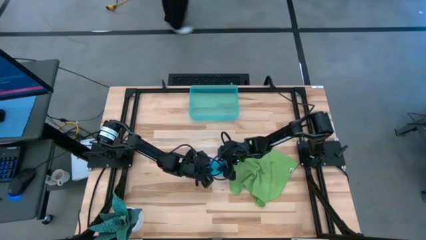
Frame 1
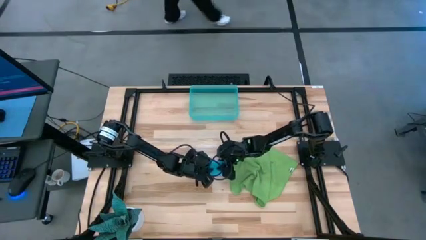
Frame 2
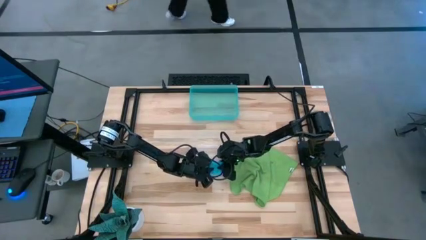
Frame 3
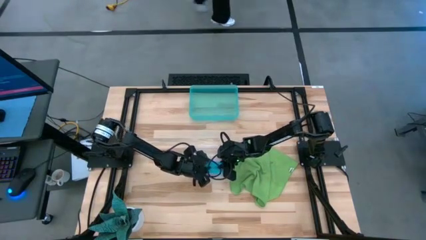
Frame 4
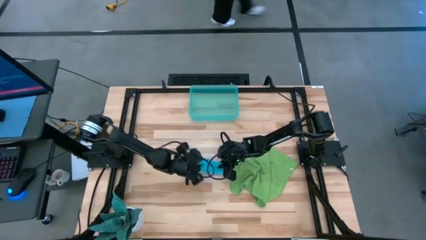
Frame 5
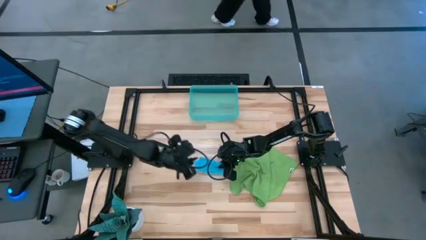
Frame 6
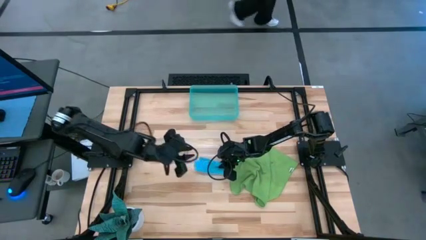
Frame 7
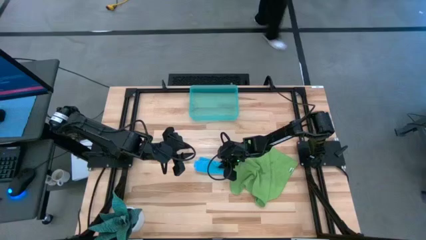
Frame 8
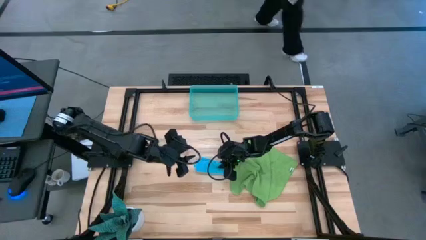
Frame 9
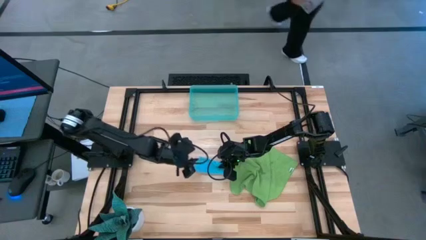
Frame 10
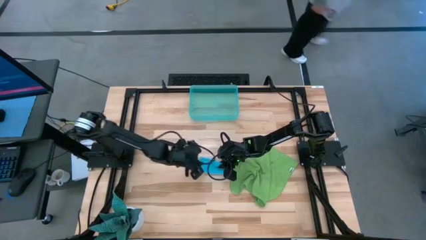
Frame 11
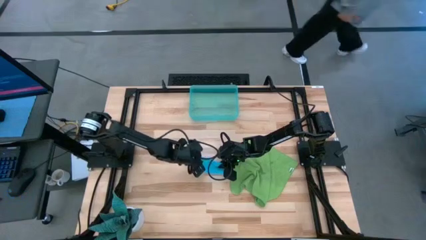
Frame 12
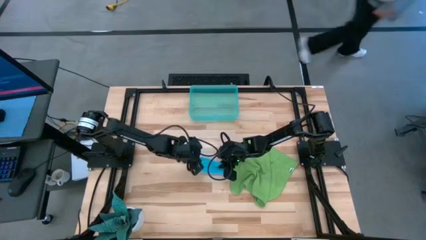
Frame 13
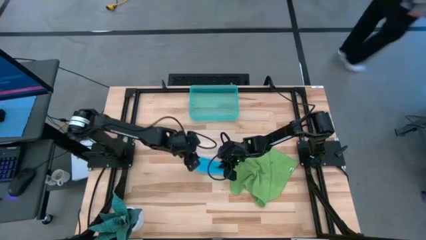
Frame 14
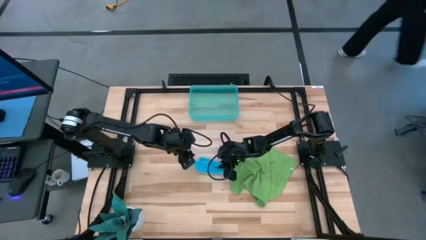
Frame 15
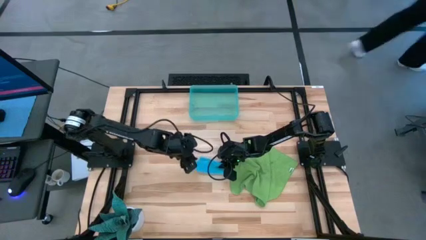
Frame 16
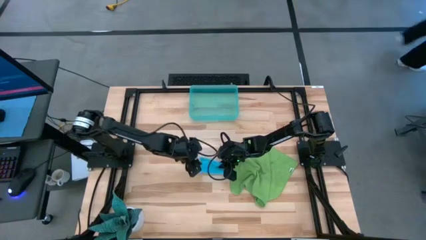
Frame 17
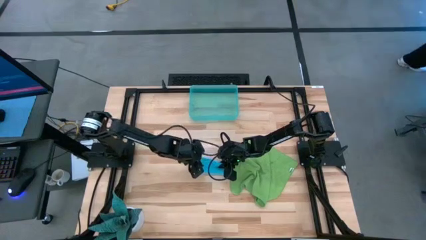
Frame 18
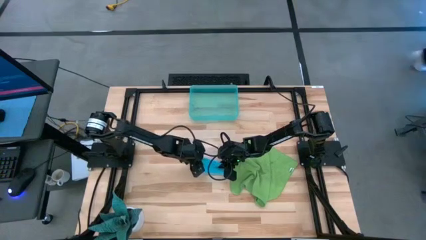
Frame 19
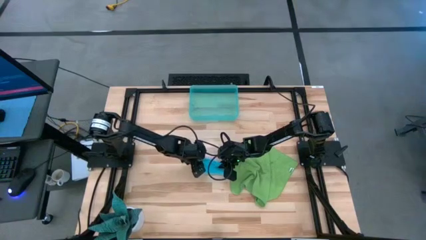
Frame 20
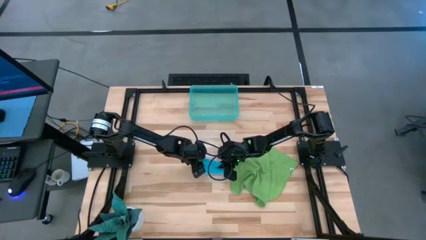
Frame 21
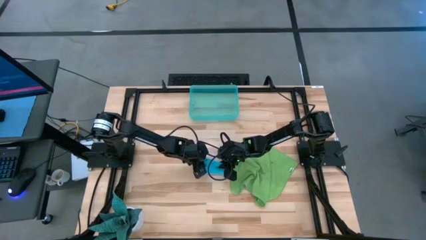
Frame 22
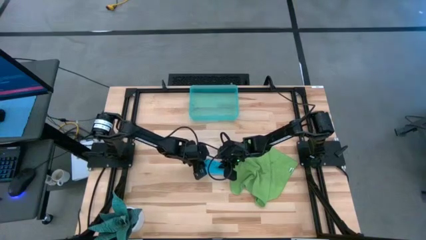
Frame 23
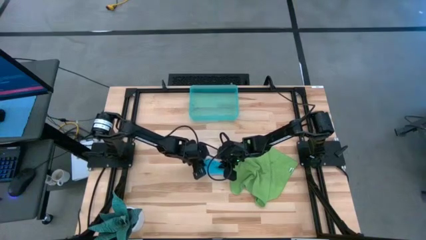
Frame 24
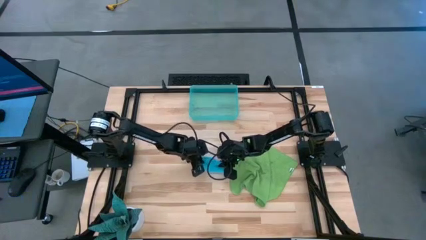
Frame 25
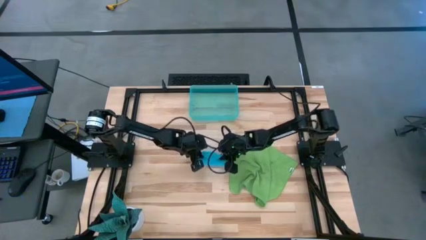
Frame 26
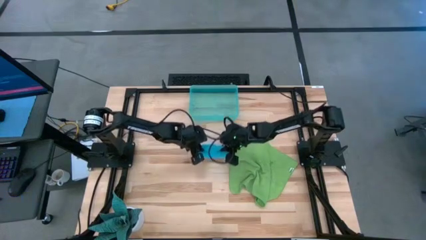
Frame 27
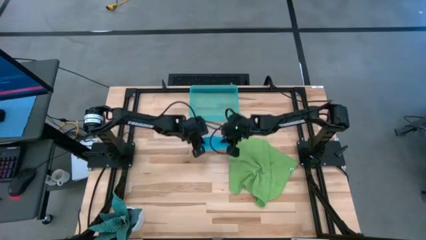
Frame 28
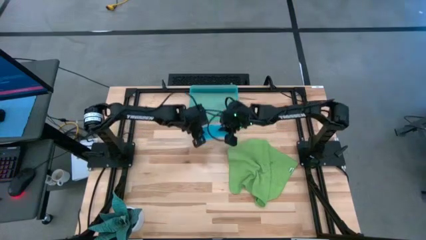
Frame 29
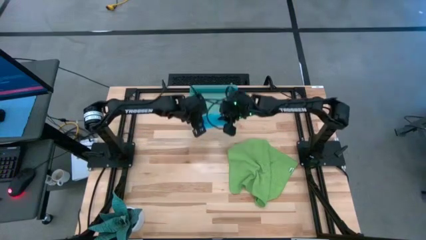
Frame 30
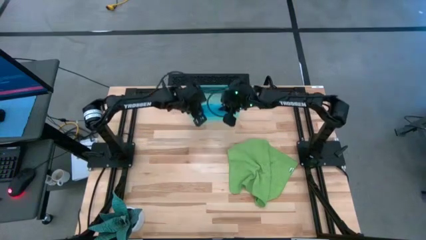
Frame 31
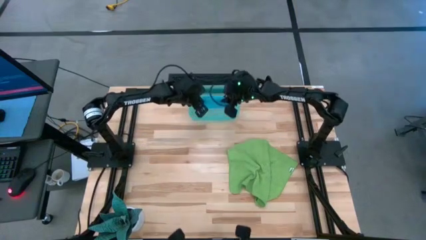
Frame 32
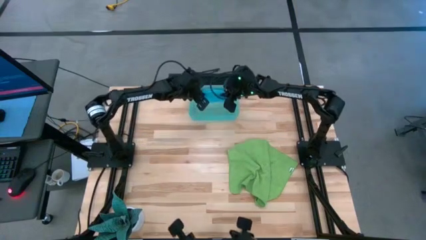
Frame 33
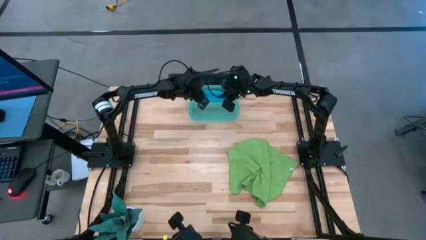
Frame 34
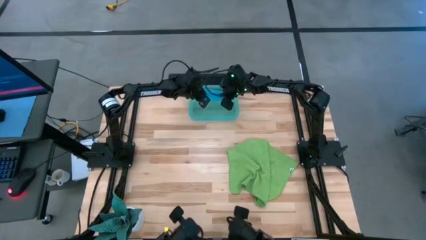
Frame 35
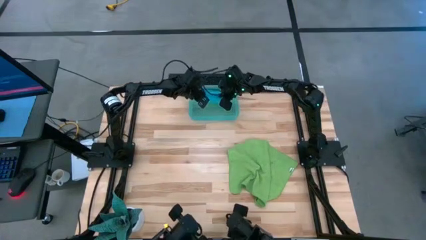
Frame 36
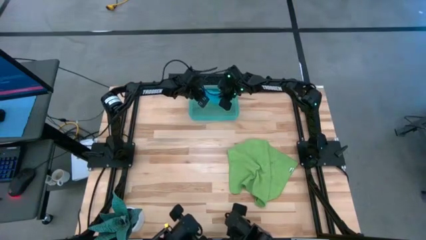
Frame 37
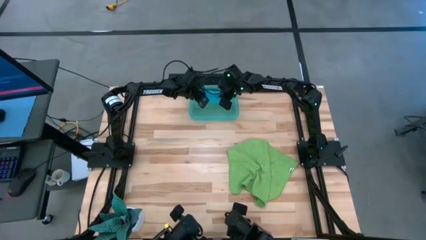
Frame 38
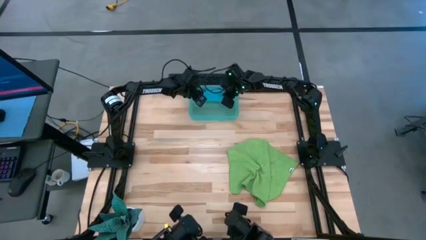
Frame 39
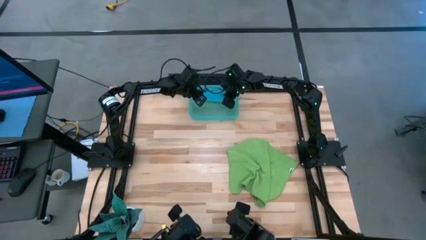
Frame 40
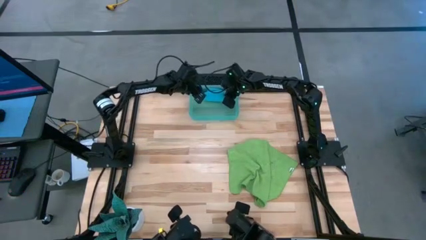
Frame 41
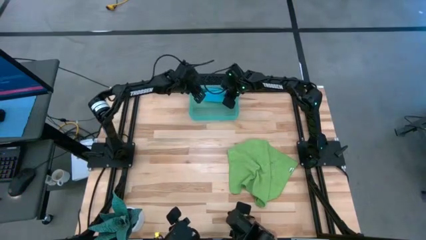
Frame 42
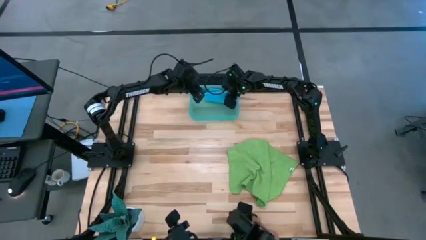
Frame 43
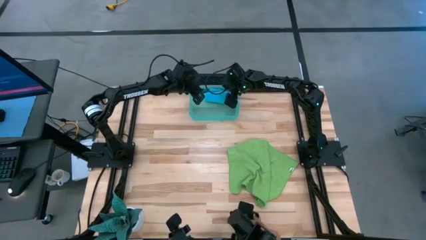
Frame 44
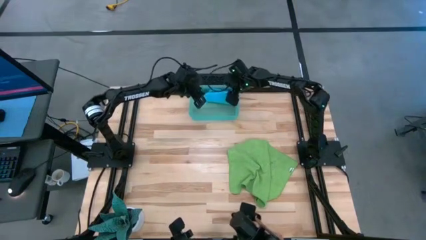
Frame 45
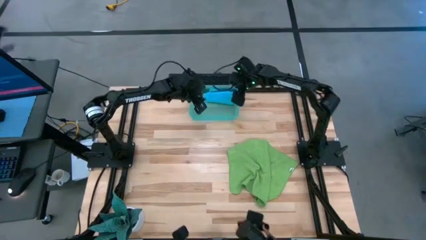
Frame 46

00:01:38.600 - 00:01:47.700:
Task: Roll microfiber towels into tight, uniform cylinder then place into a basket
Put the rolled blue microfiber cloth into the blue bin

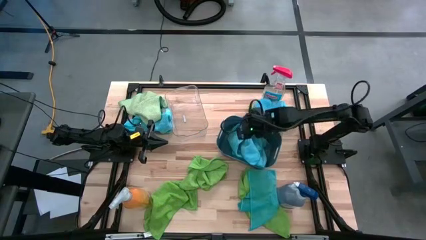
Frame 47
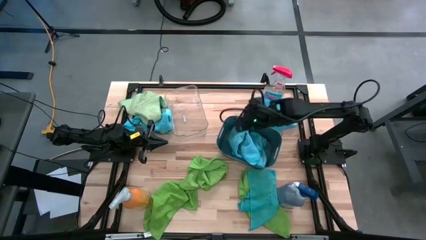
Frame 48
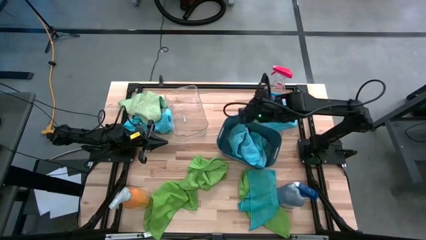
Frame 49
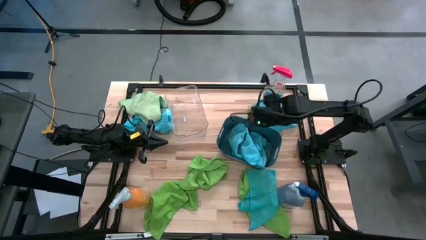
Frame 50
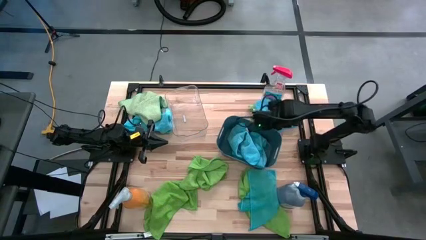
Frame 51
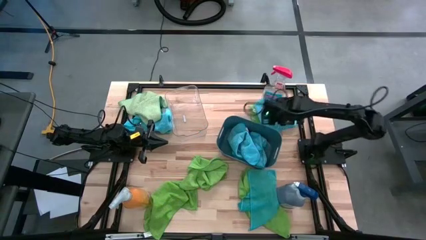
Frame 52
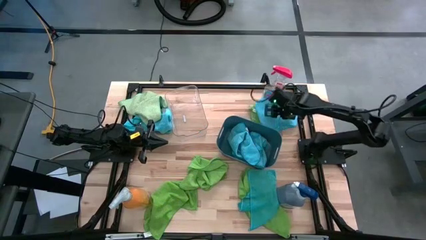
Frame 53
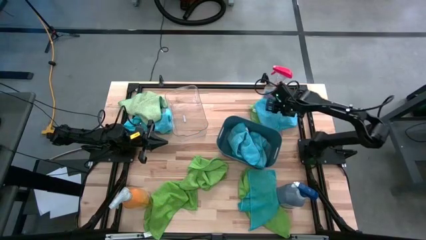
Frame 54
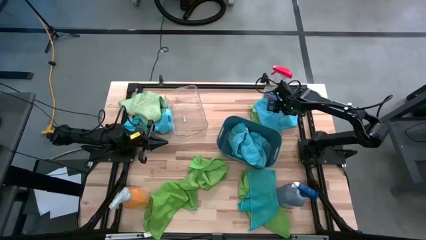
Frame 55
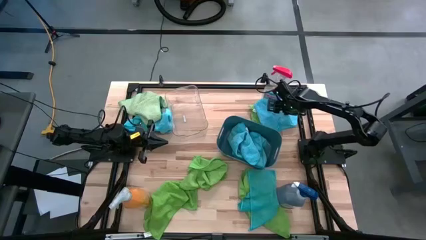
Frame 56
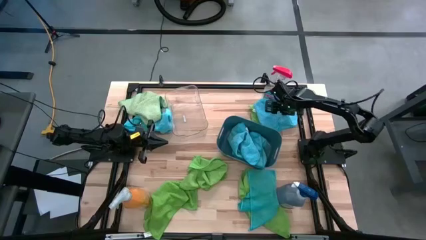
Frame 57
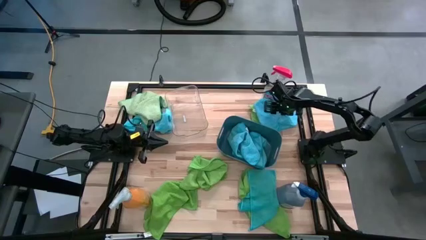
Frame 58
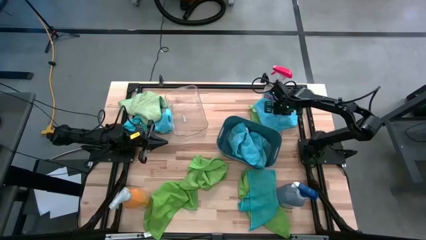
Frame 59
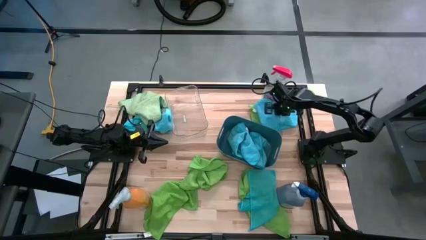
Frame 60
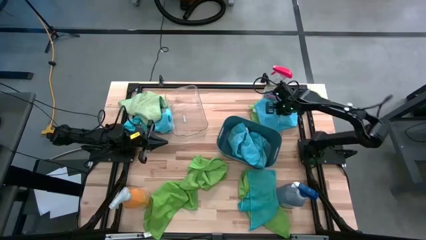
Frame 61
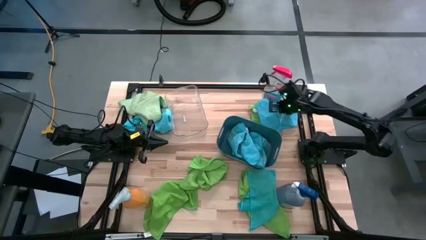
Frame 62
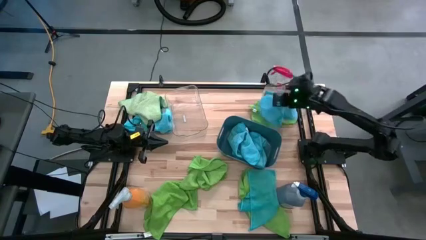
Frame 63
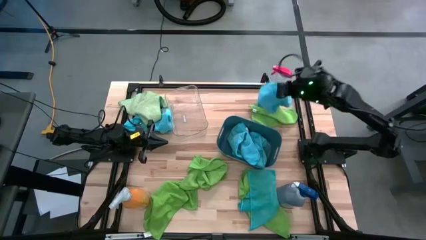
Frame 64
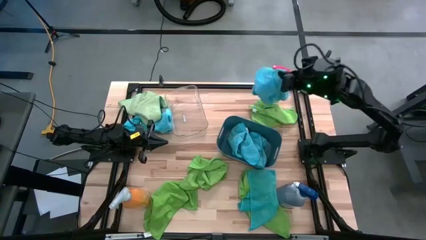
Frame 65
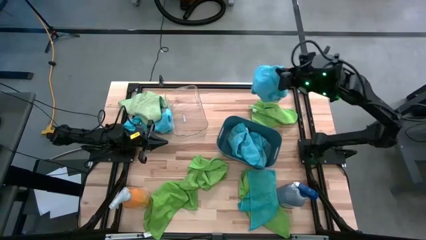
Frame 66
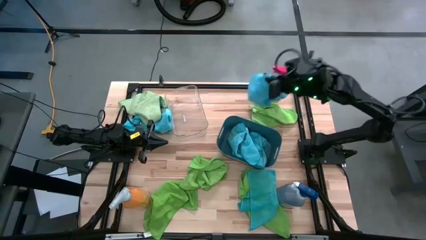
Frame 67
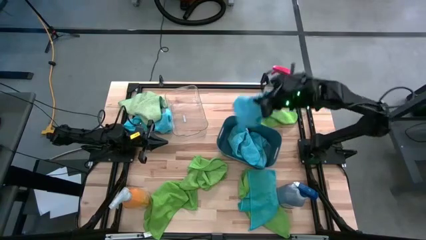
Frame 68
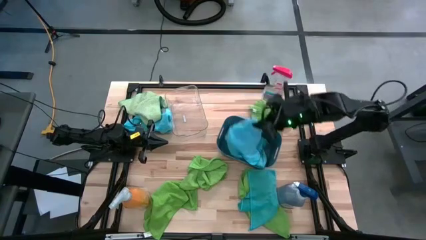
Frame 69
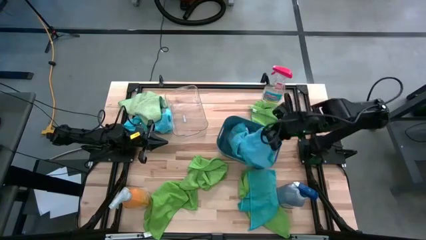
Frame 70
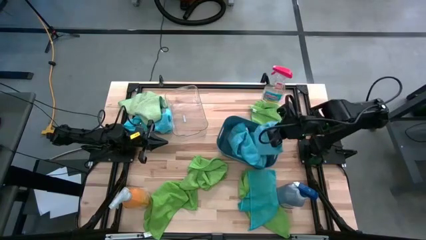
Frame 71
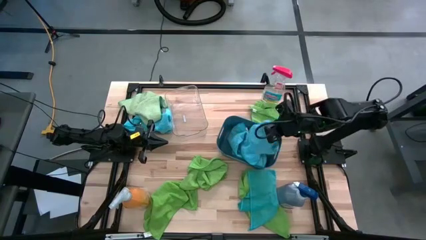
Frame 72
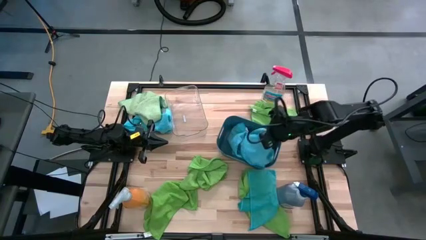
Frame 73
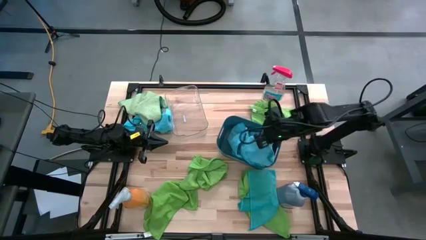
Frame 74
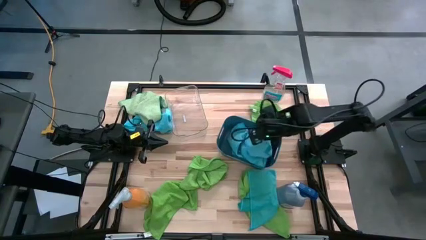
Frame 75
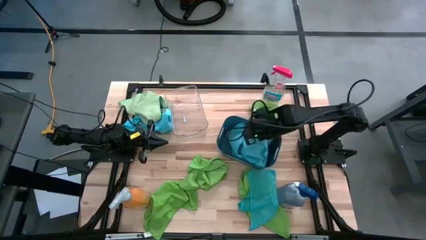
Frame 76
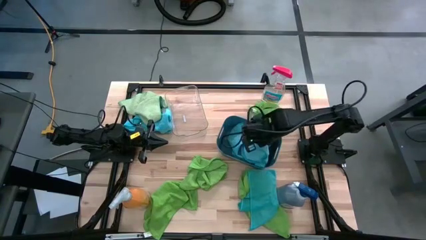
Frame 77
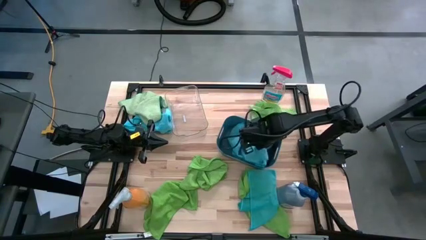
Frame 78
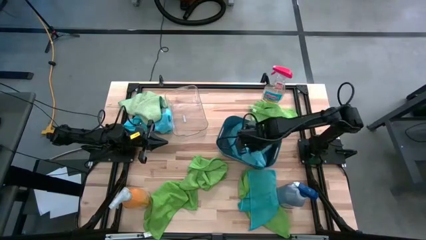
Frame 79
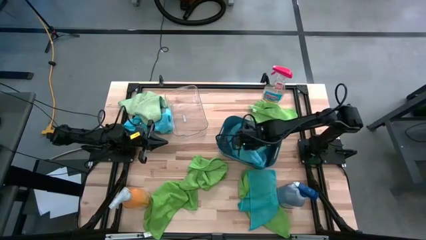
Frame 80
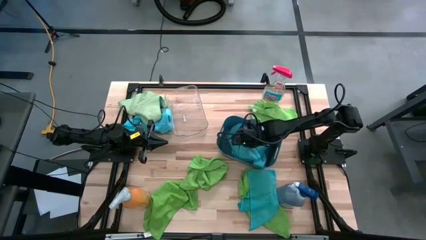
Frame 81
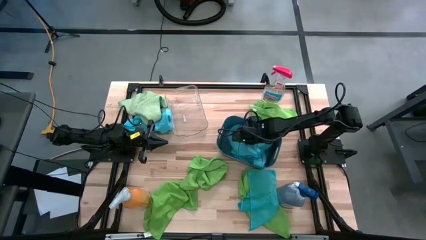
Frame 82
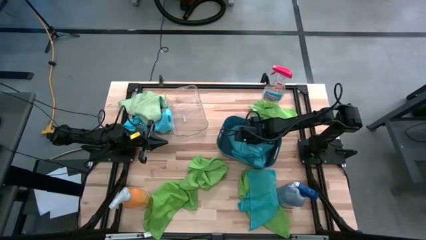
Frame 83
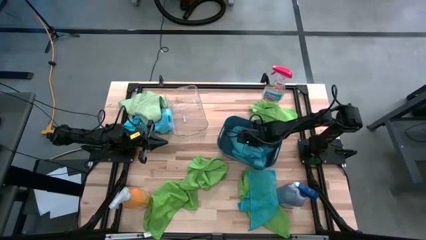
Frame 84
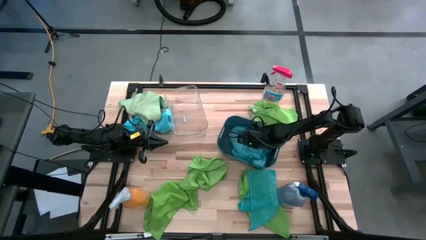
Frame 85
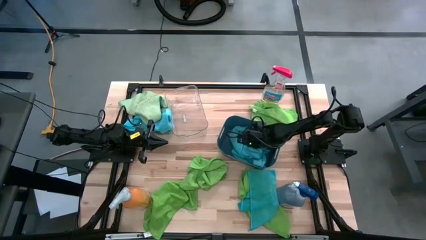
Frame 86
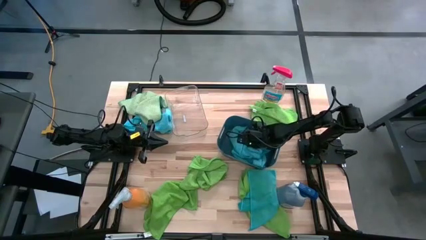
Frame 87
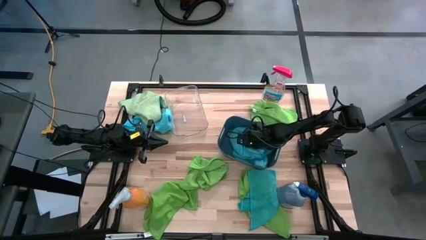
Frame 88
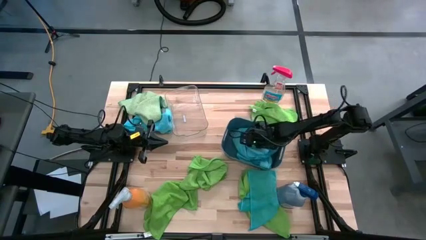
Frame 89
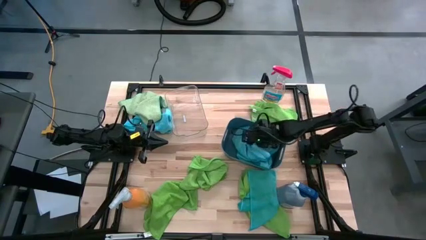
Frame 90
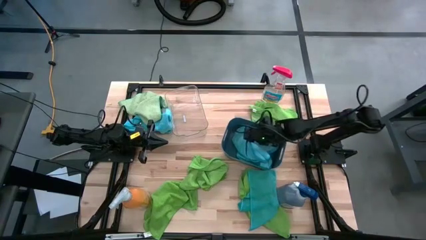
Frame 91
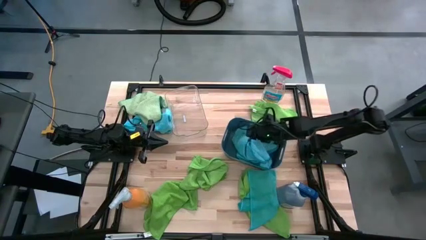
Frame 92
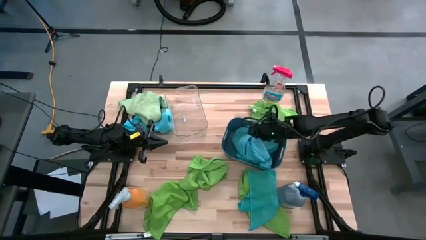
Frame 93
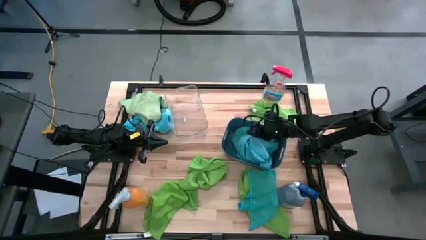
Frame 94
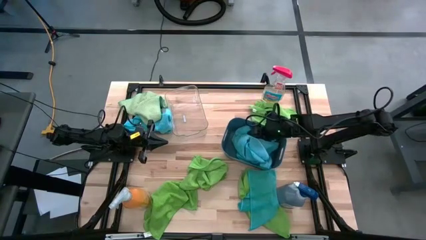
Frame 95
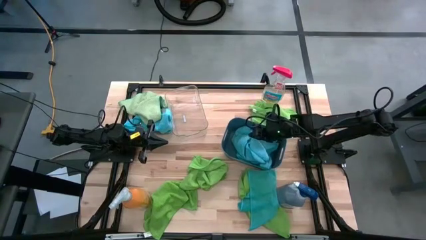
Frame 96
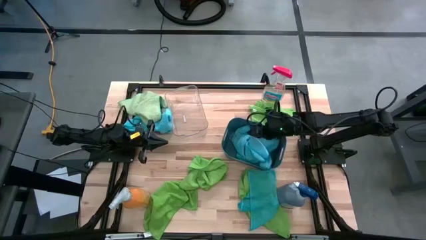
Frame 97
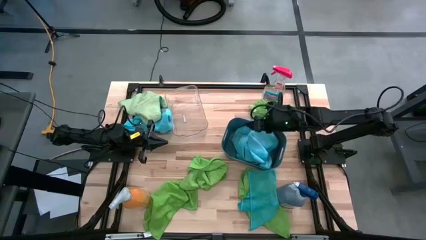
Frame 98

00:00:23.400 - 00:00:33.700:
Task: Sort microfiber towel by color & place in baskets
Put the blue towel into the blue bin
